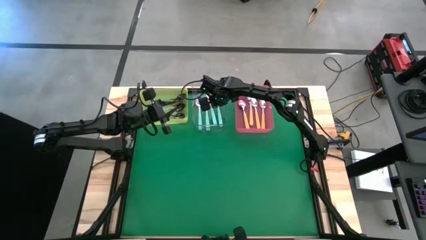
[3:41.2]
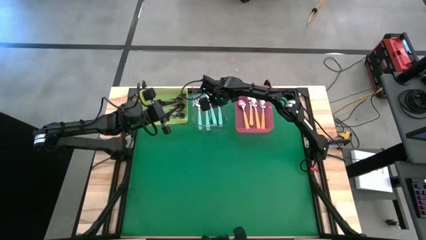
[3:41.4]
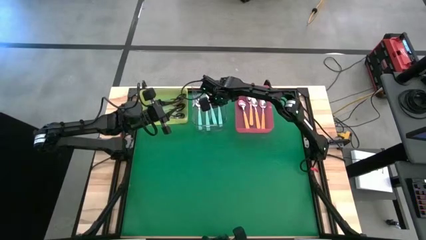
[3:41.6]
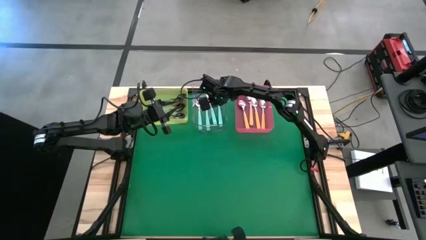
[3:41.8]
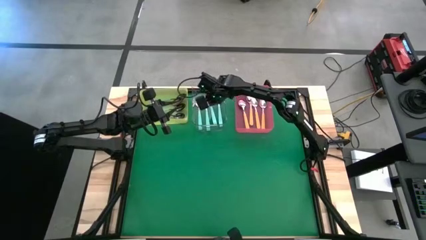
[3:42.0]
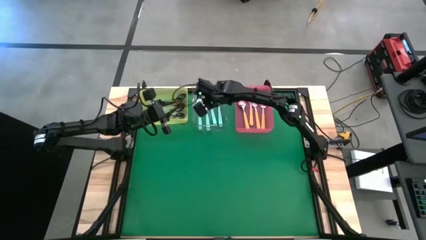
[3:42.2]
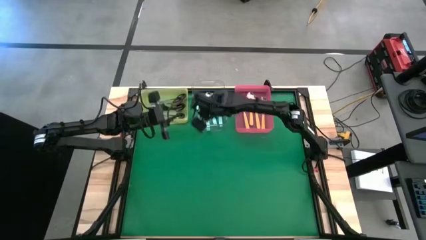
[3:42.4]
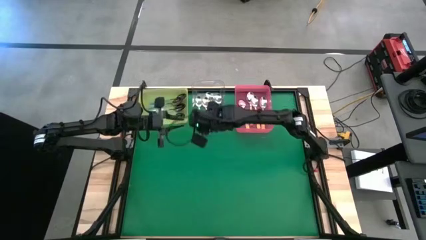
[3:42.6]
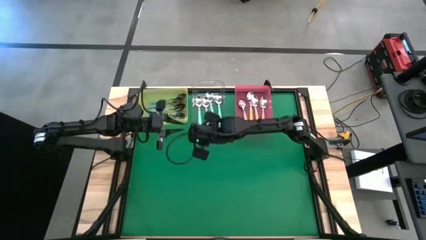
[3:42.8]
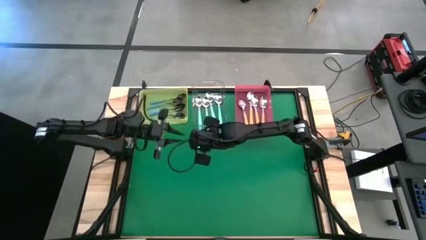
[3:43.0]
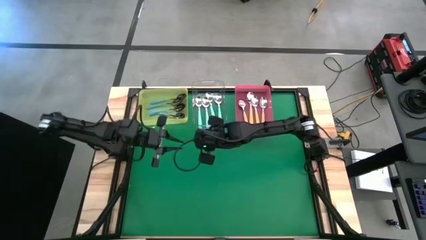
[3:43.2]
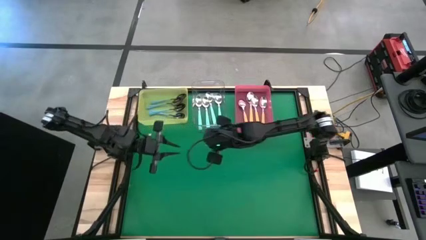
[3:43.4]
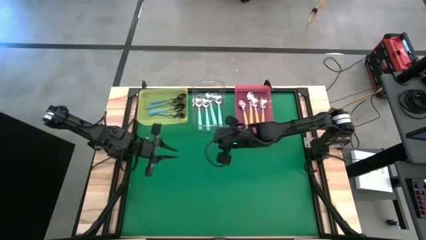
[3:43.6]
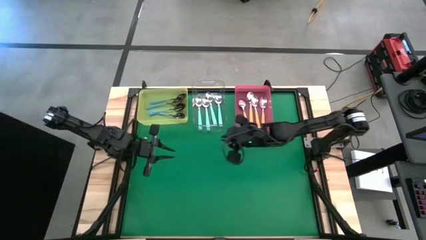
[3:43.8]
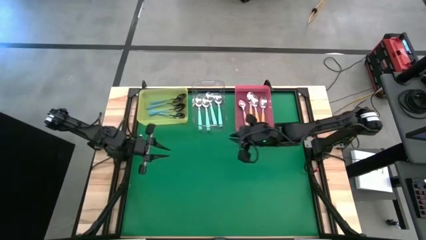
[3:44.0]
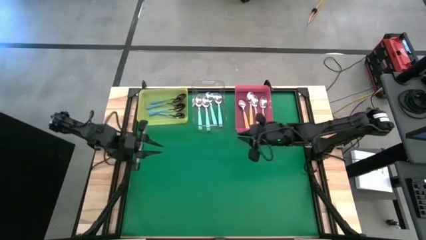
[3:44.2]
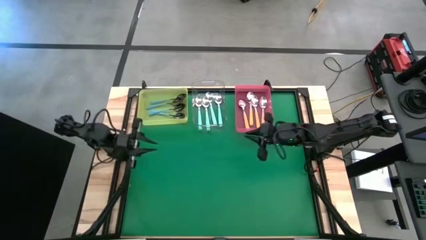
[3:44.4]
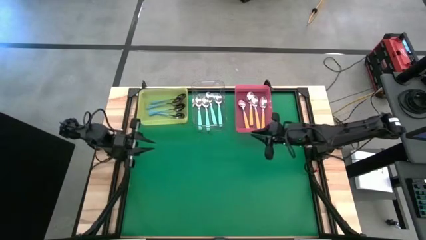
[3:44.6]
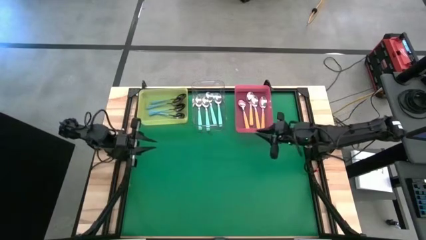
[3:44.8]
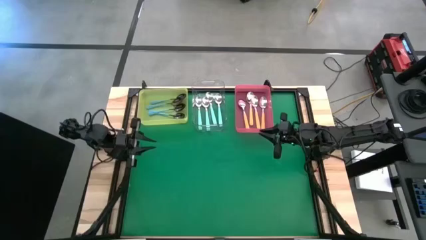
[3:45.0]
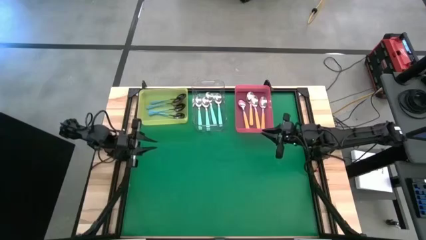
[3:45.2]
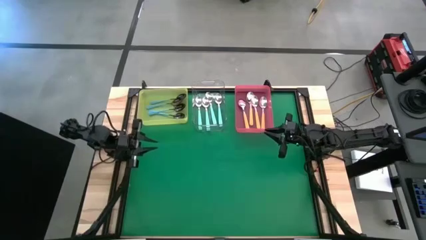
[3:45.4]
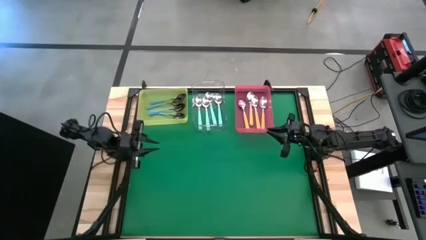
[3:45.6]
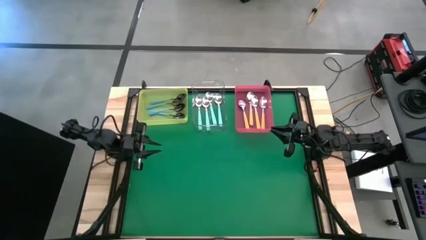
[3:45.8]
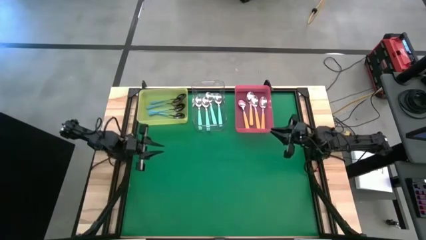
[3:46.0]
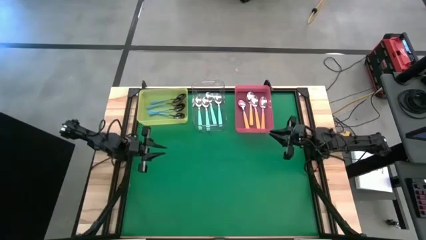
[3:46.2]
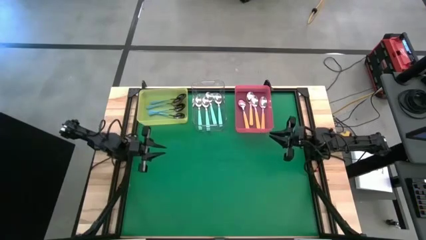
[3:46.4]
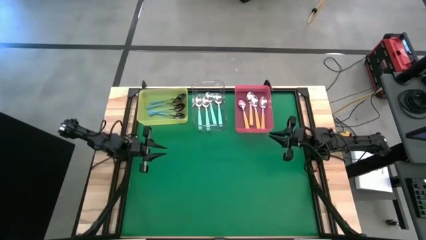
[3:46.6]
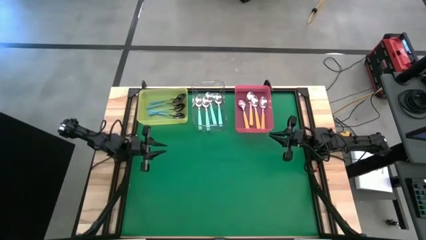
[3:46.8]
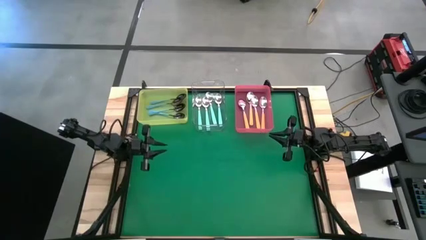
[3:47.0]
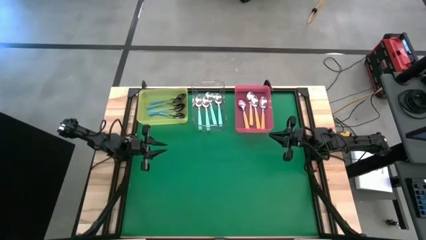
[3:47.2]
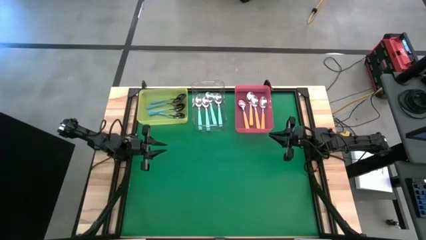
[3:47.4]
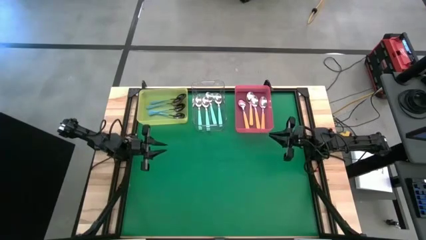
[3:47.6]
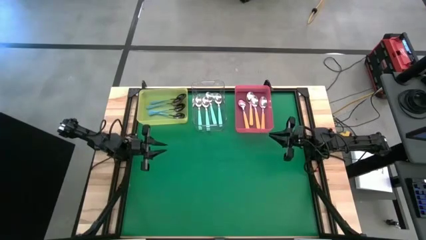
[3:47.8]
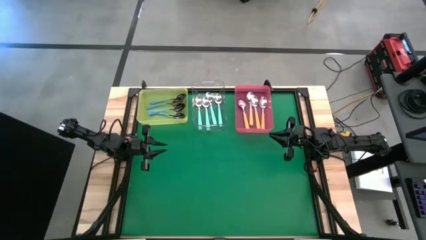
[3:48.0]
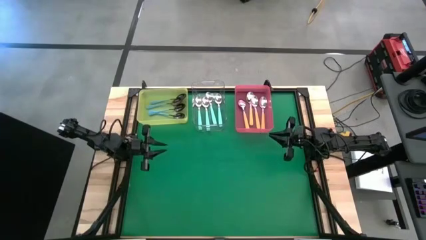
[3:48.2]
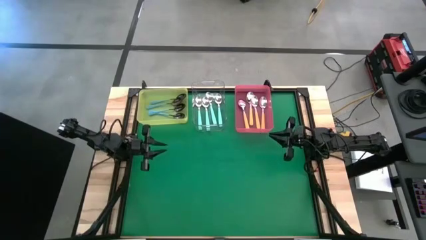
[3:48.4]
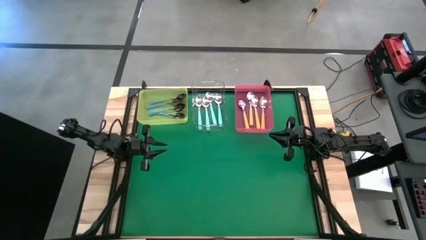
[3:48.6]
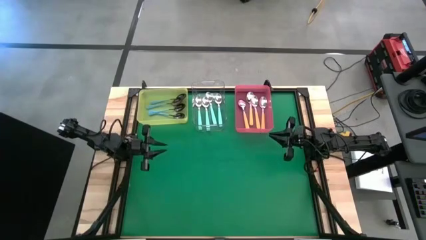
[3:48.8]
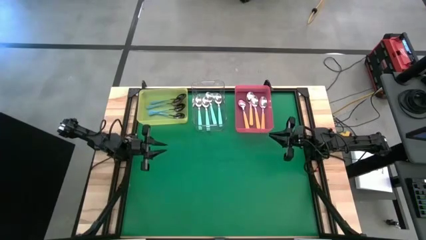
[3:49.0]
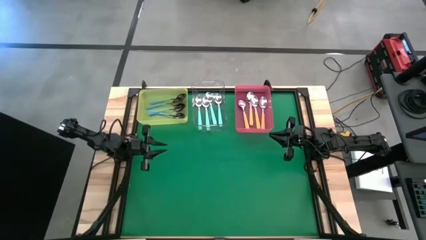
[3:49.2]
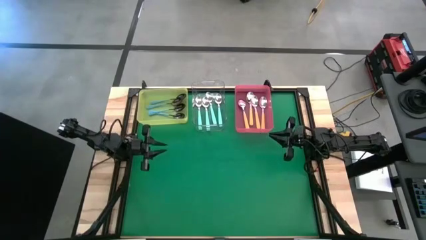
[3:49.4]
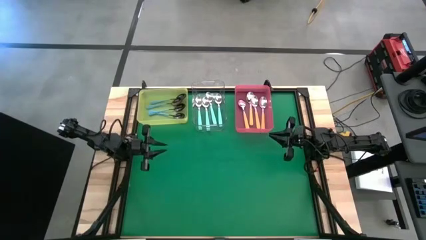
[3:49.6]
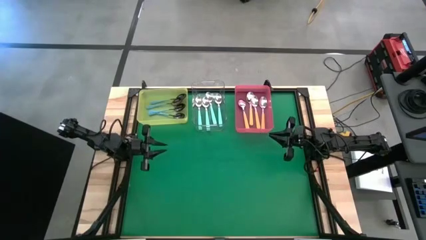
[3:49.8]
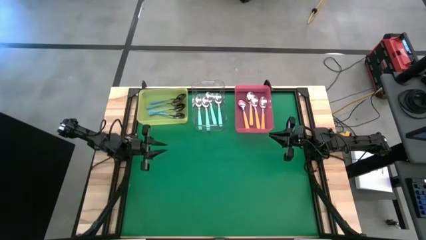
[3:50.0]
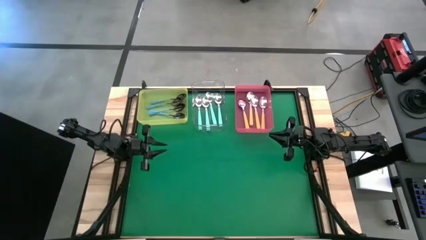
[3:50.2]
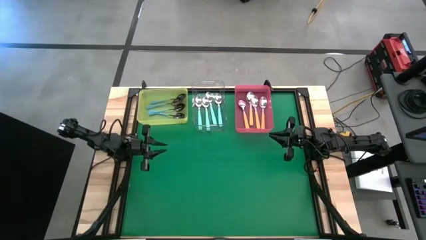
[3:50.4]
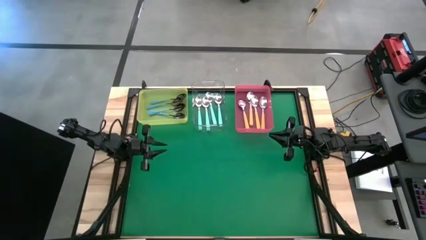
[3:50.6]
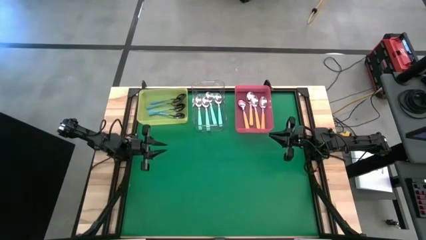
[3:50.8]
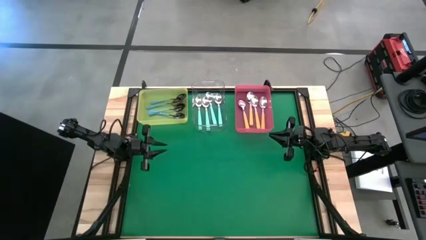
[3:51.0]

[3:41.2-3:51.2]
Task: Sort silverware by color (type)
Return to Home Position
